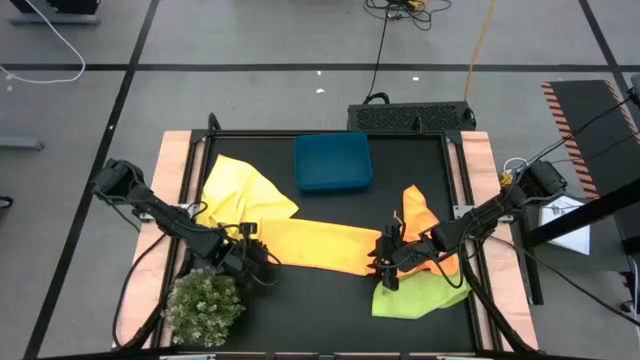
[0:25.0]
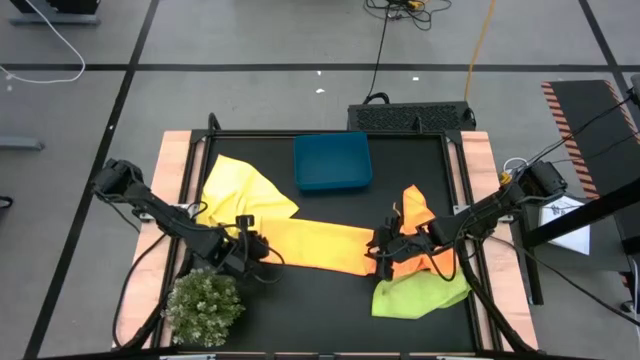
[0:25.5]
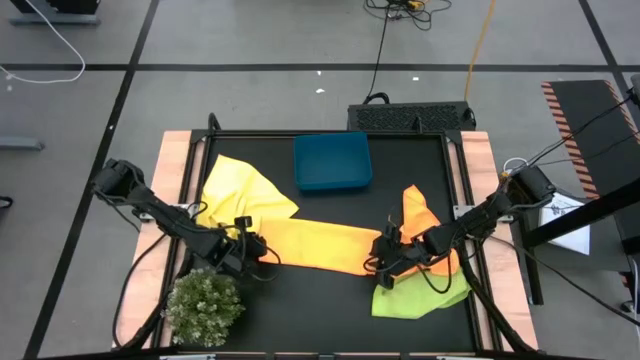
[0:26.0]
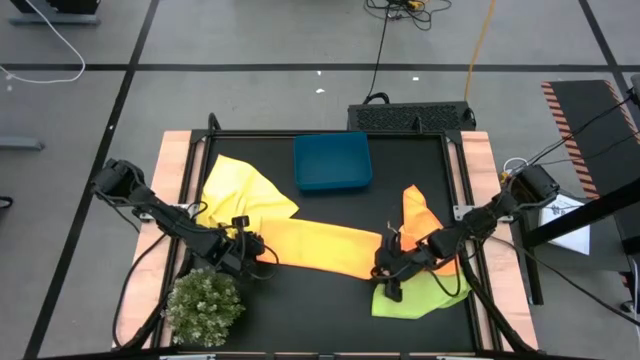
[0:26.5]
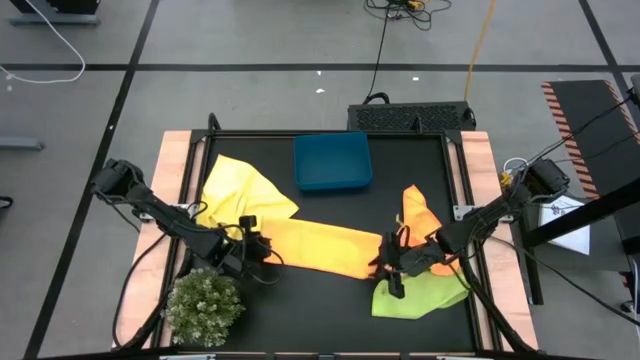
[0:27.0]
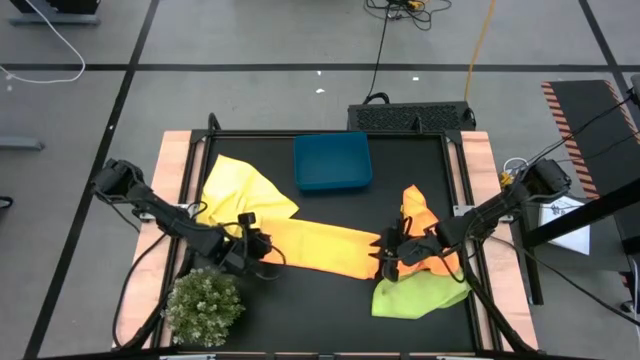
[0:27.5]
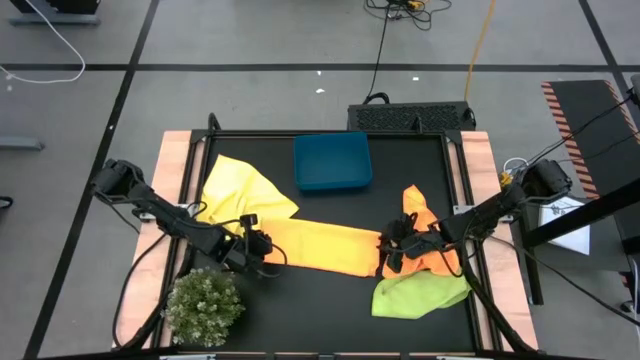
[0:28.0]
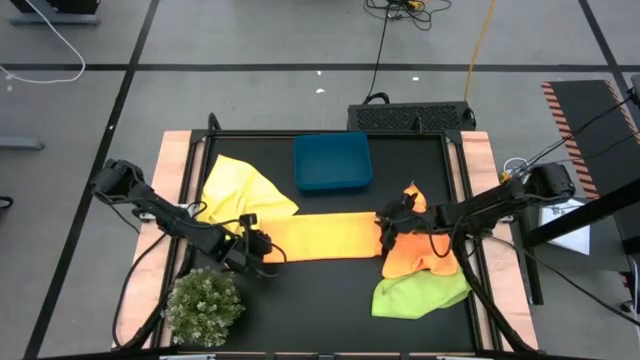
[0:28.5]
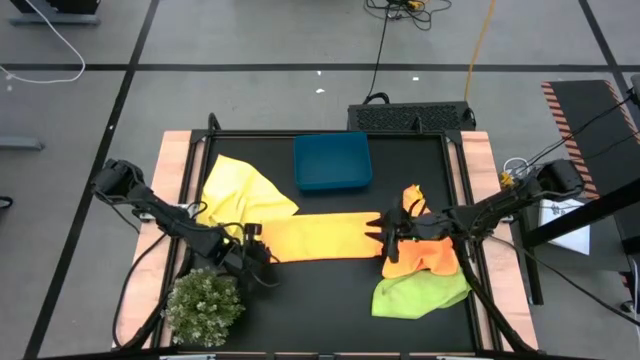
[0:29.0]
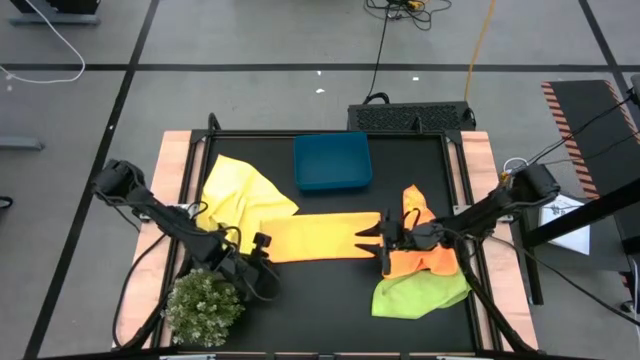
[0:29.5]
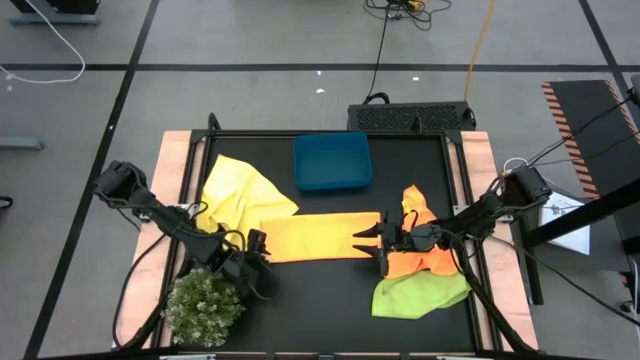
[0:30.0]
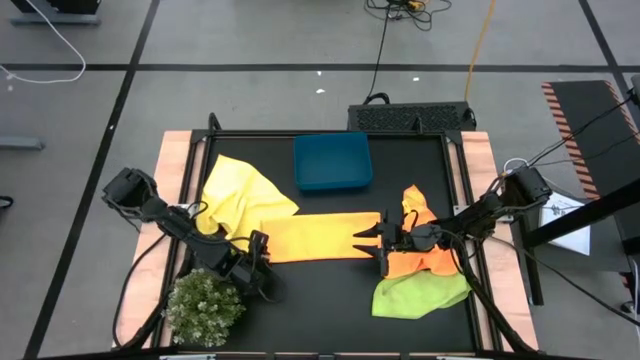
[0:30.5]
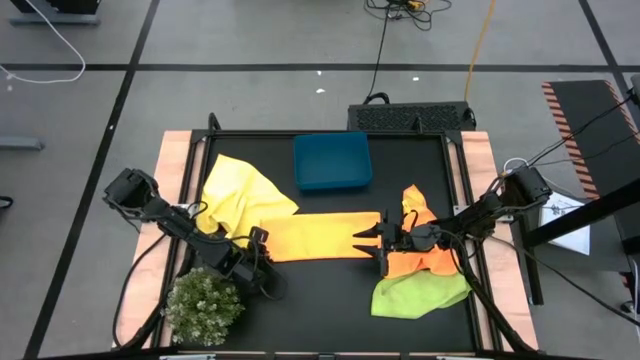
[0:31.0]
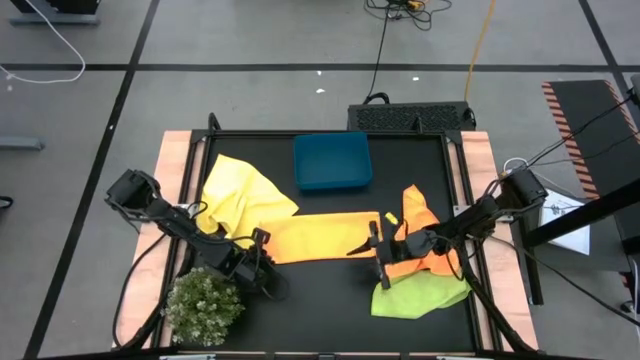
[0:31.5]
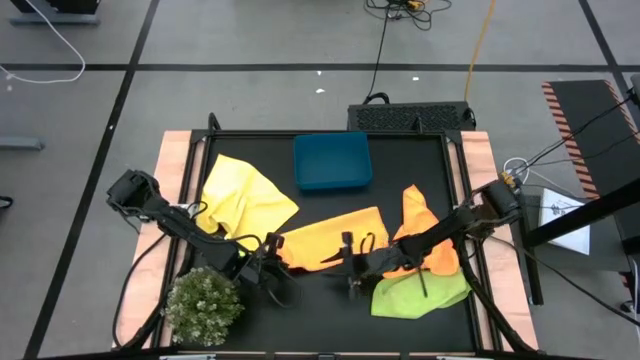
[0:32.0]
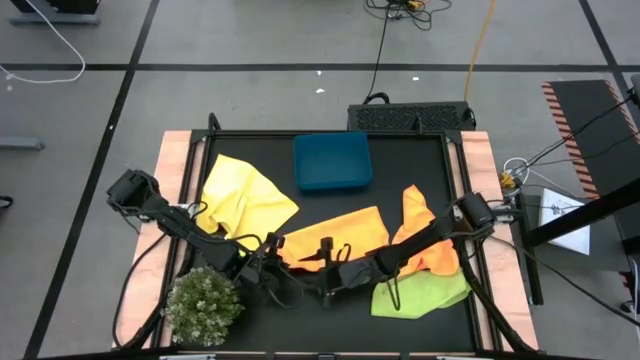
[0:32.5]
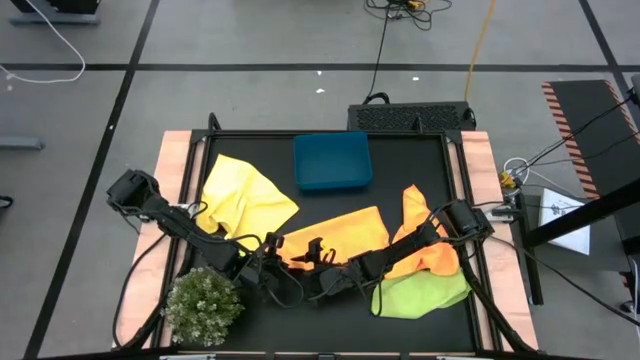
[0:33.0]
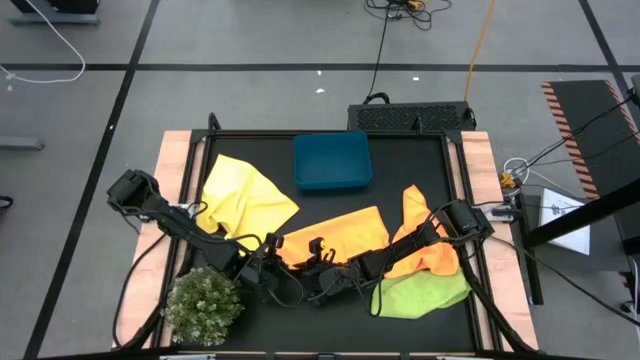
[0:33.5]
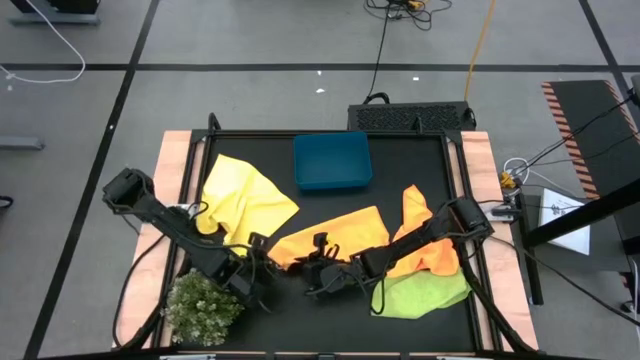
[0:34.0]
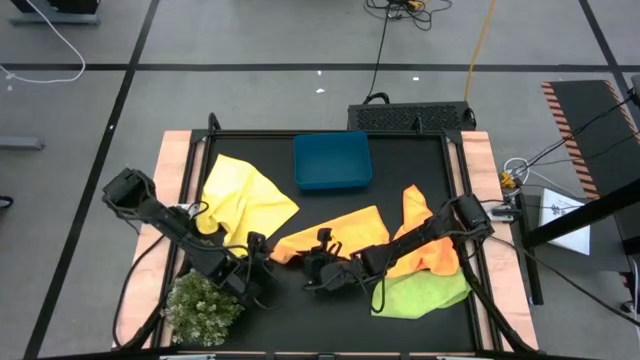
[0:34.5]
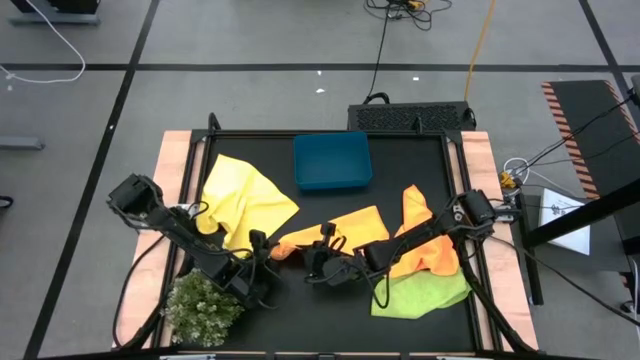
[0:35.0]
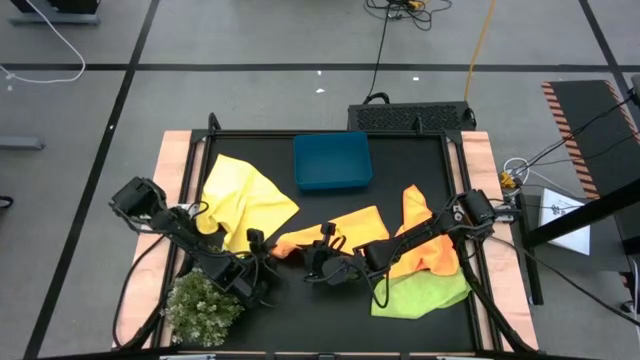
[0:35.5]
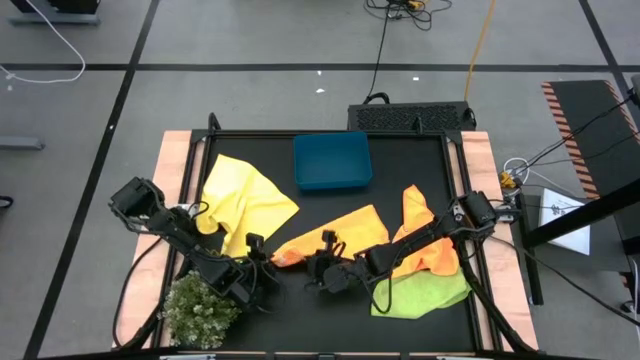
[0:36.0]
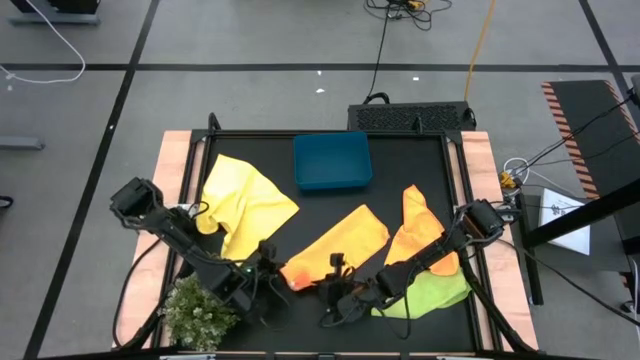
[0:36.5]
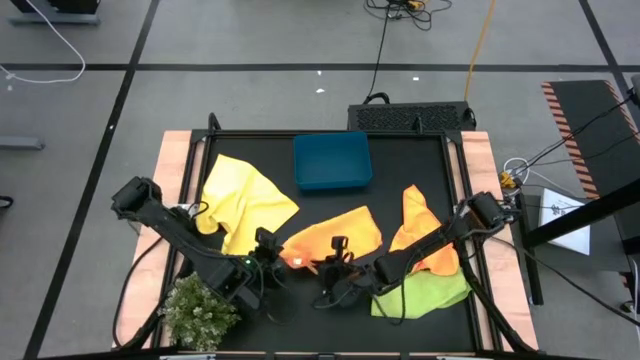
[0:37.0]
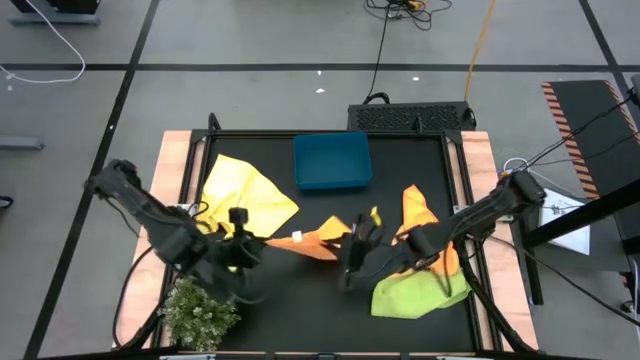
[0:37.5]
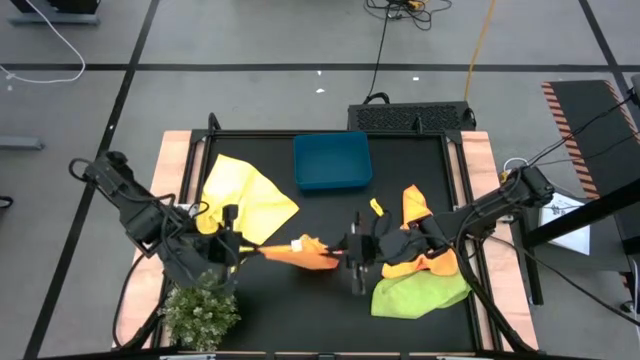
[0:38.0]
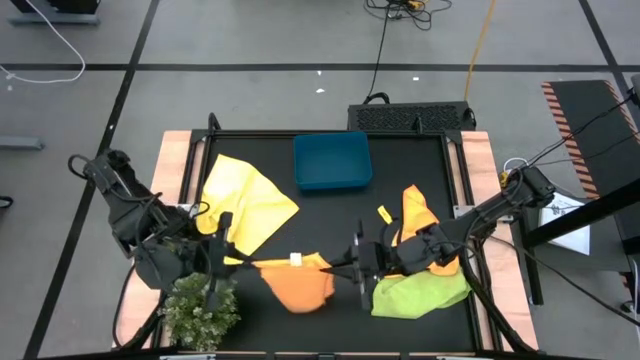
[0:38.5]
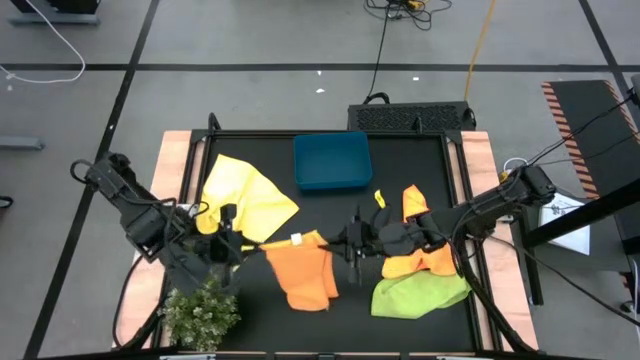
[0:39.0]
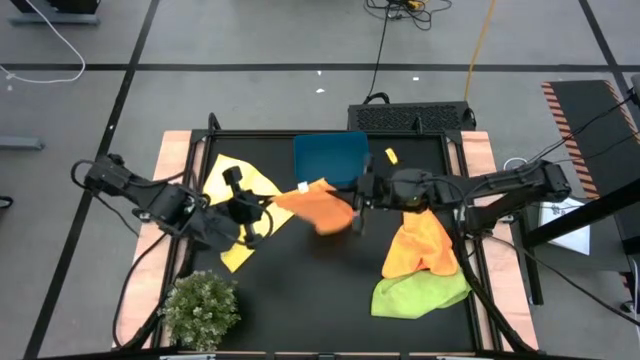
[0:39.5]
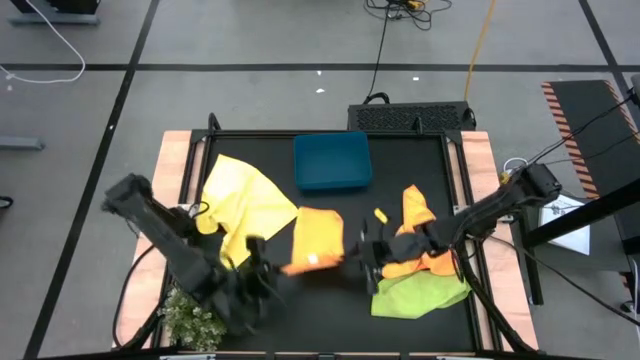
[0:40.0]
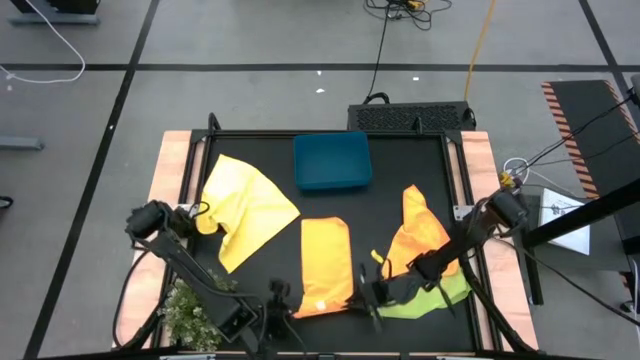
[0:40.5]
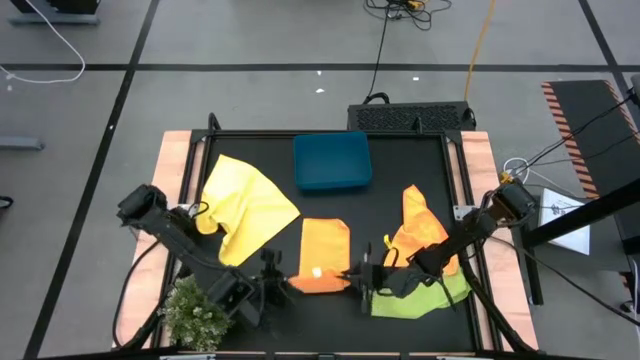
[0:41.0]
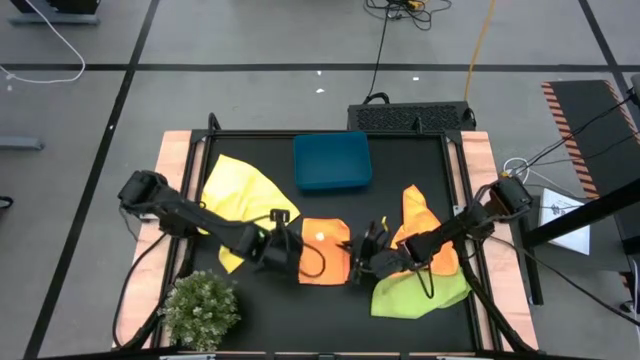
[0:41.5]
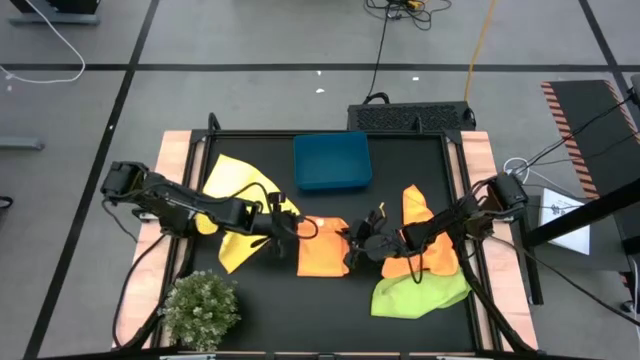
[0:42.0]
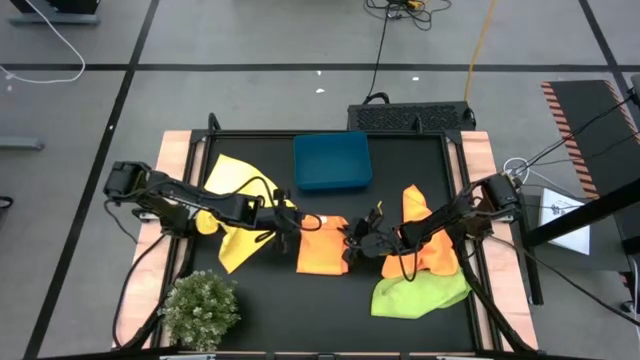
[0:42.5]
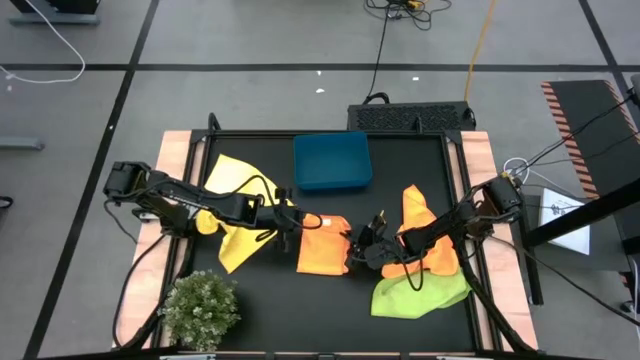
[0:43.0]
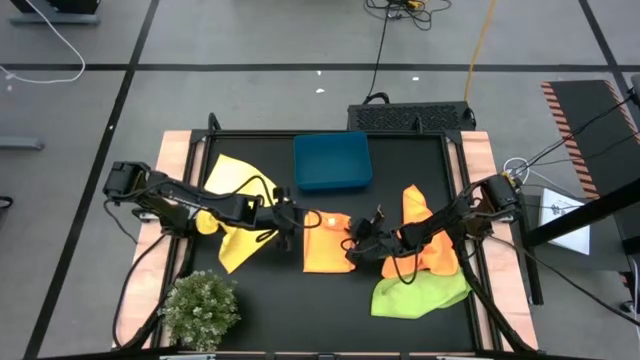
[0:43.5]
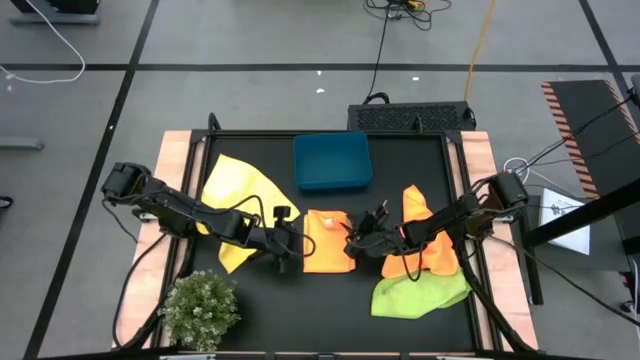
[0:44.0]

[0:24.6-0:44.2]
Task: Fold microfiber towels
Fold the left orange microfiber towel
